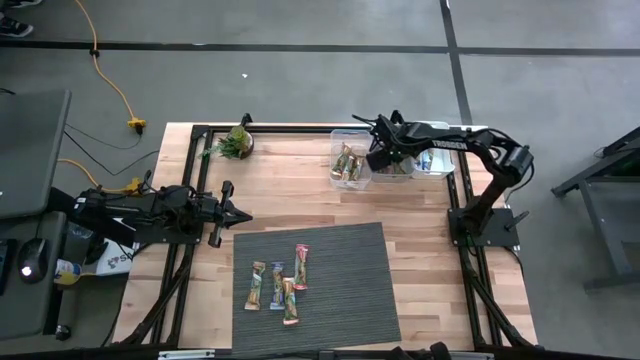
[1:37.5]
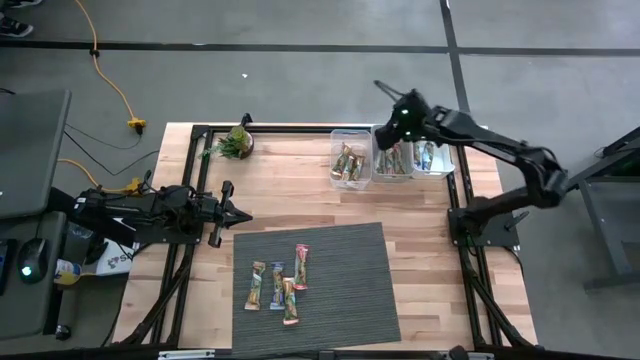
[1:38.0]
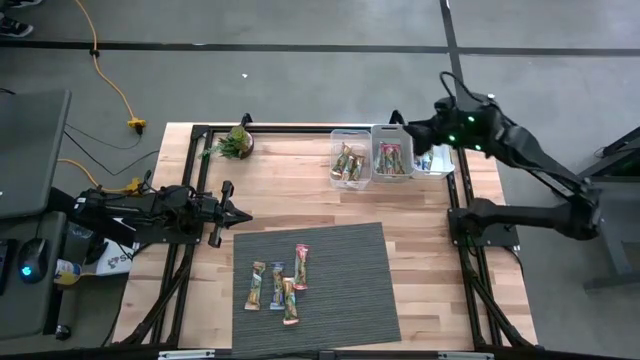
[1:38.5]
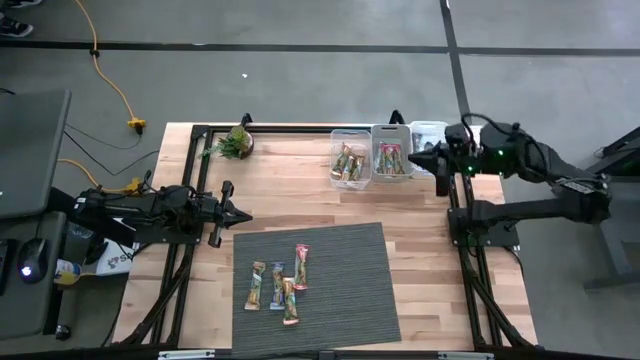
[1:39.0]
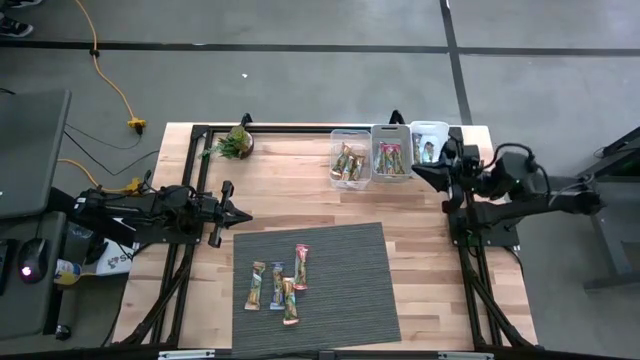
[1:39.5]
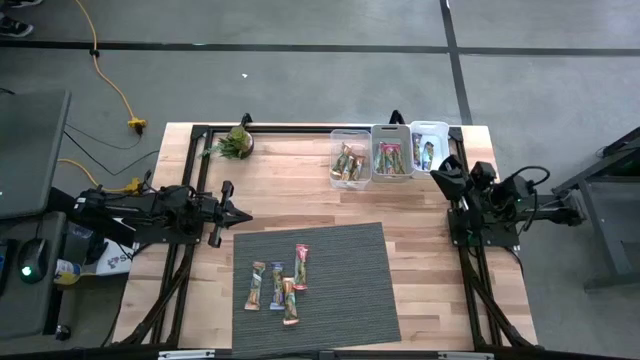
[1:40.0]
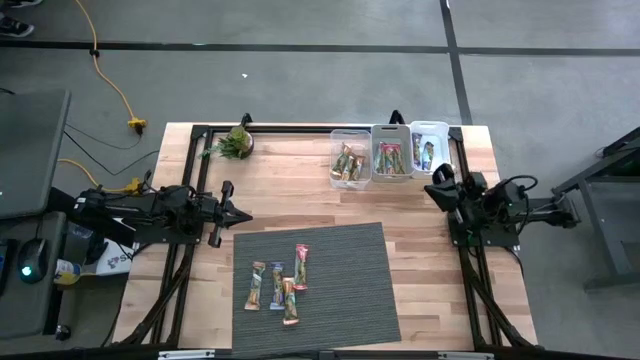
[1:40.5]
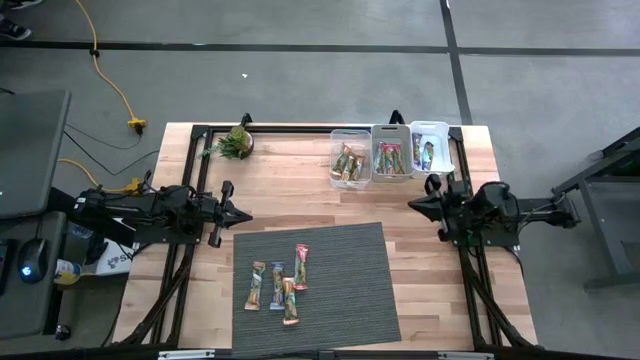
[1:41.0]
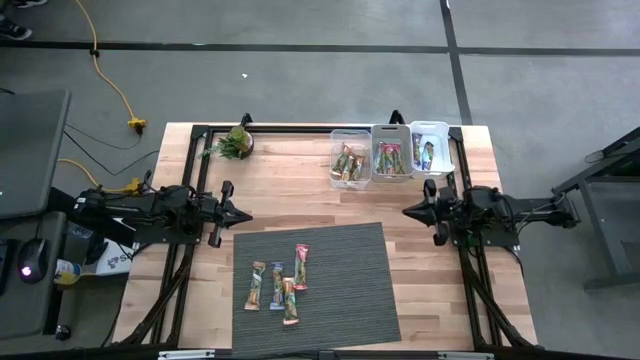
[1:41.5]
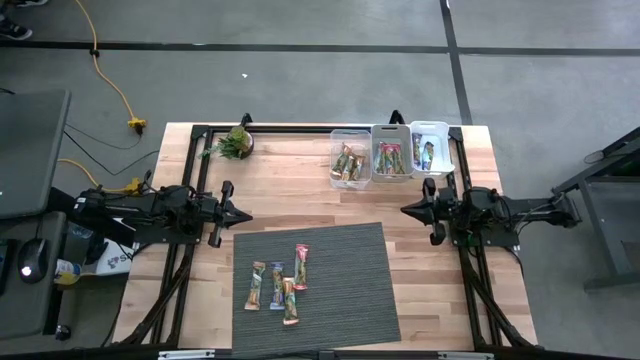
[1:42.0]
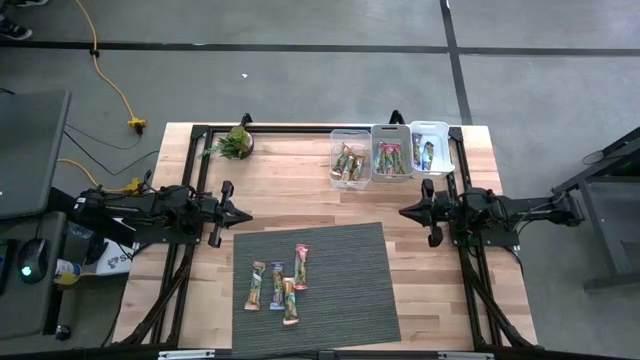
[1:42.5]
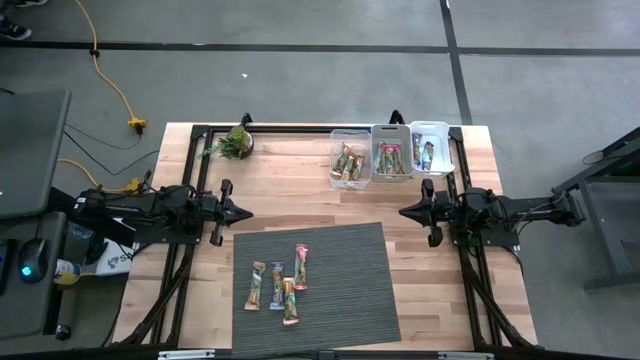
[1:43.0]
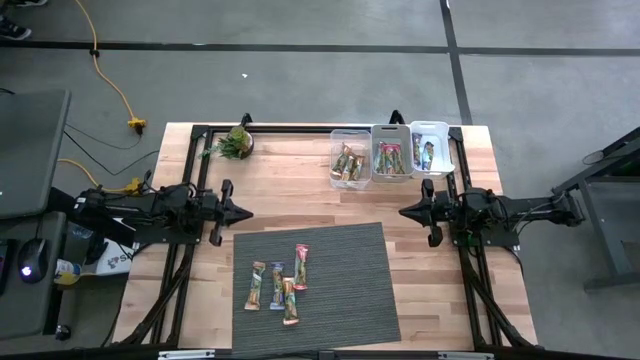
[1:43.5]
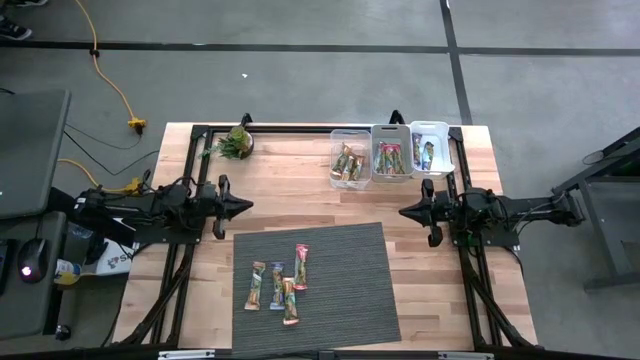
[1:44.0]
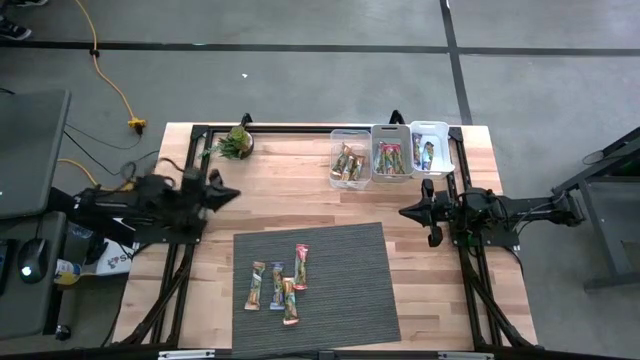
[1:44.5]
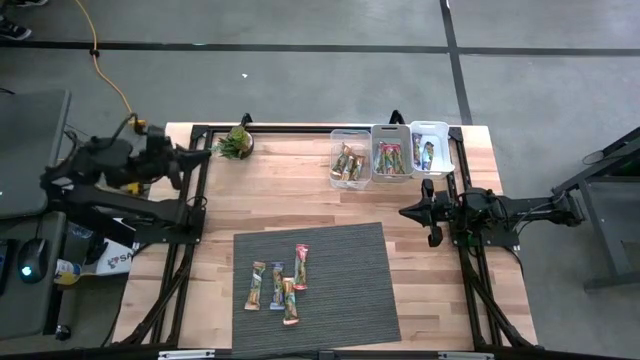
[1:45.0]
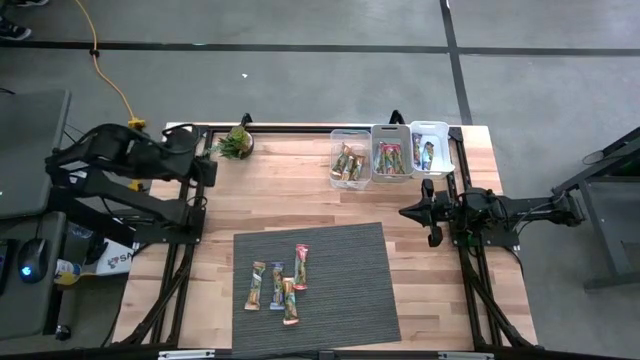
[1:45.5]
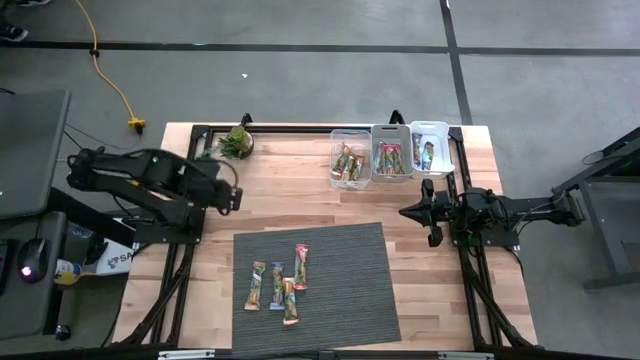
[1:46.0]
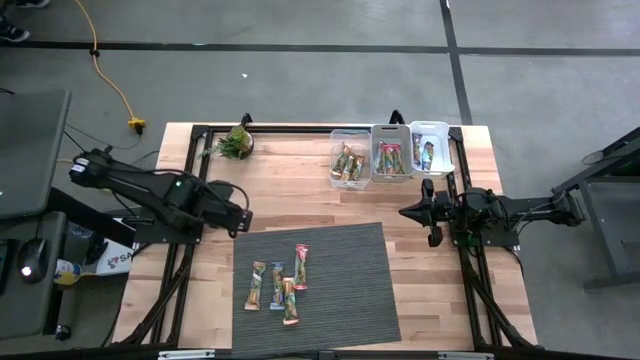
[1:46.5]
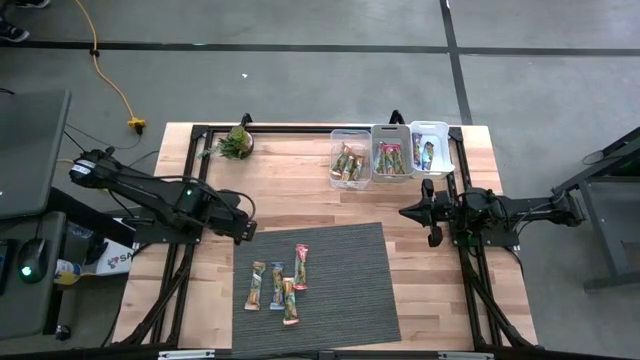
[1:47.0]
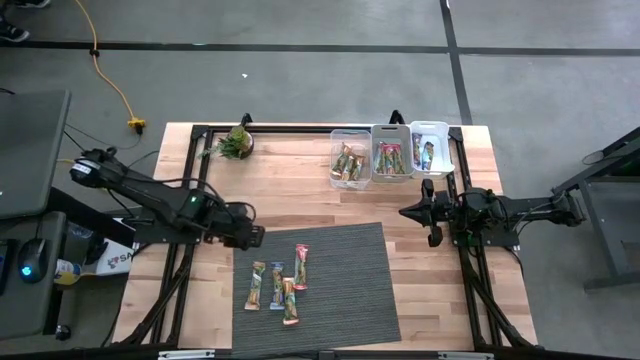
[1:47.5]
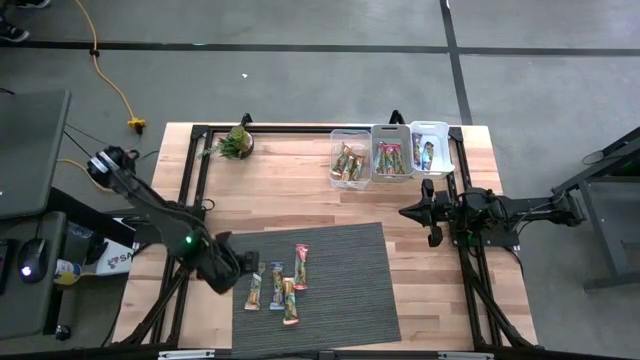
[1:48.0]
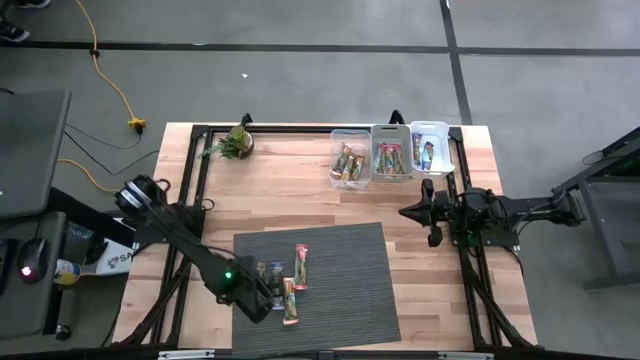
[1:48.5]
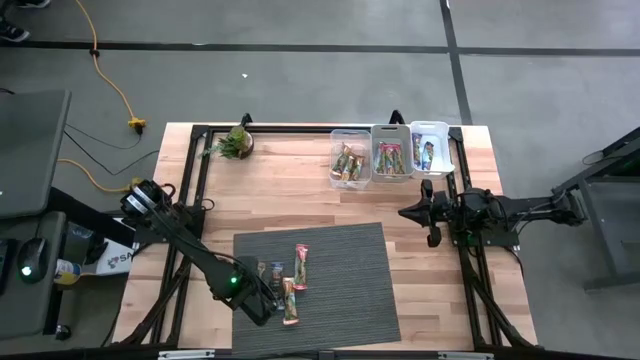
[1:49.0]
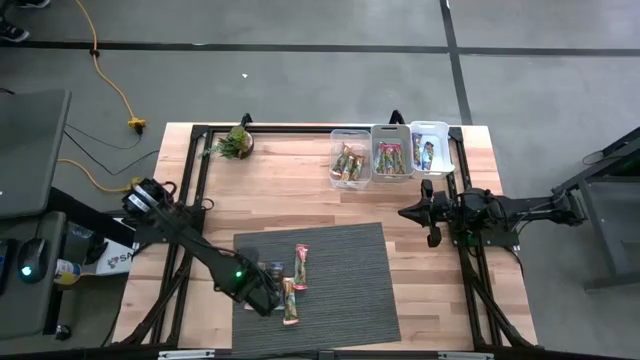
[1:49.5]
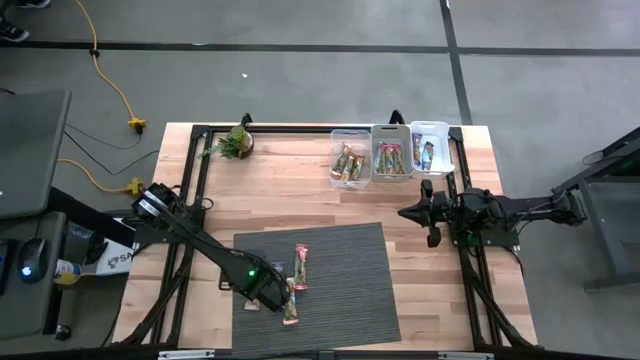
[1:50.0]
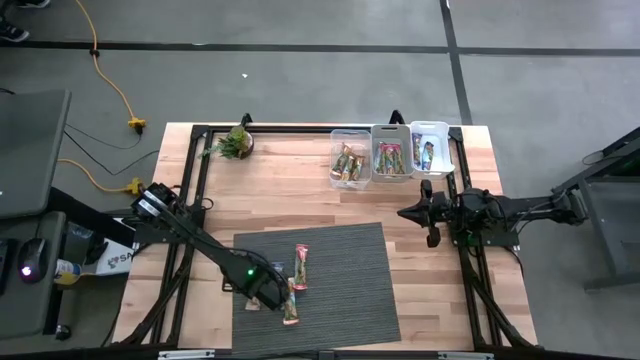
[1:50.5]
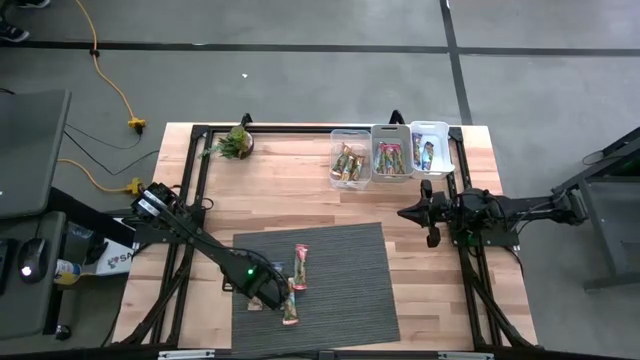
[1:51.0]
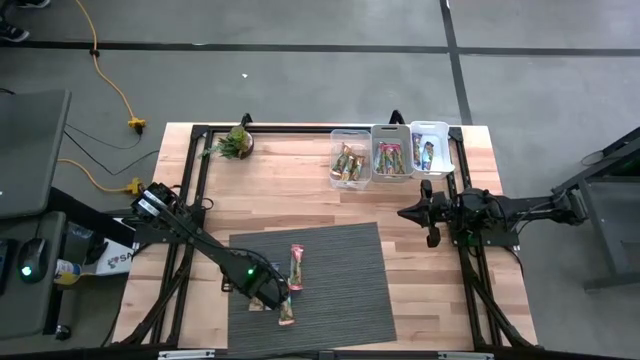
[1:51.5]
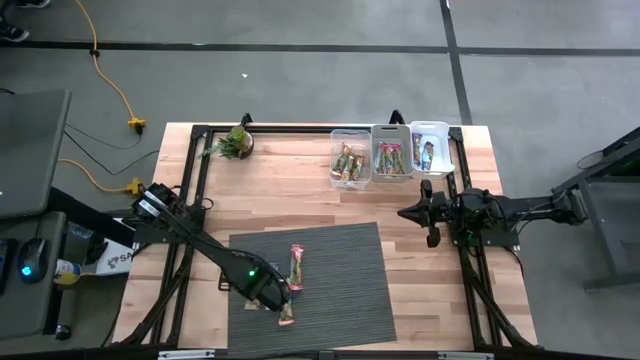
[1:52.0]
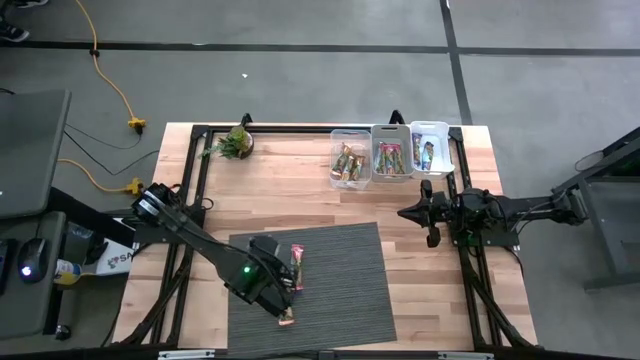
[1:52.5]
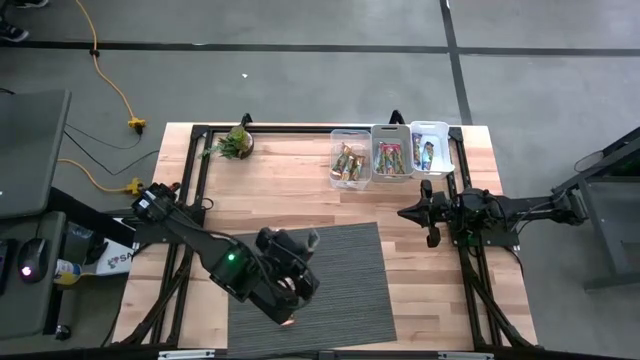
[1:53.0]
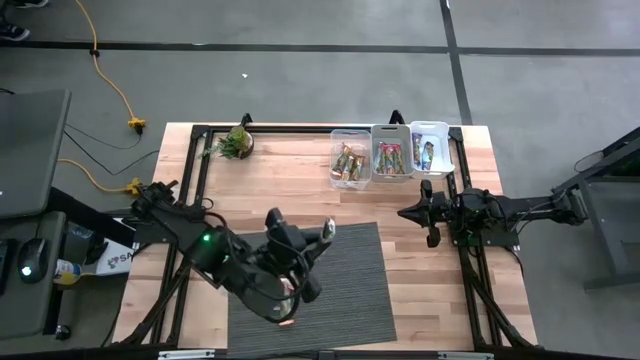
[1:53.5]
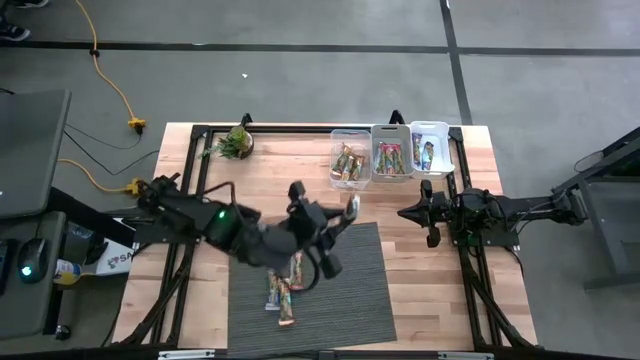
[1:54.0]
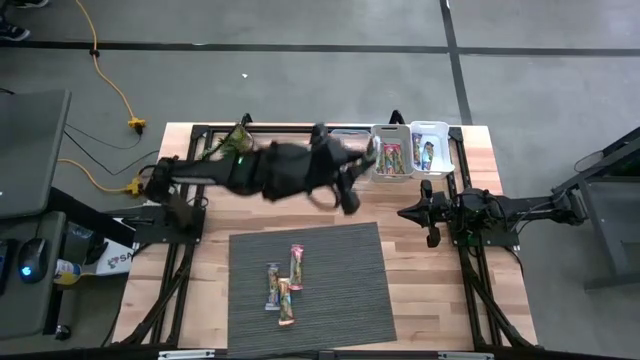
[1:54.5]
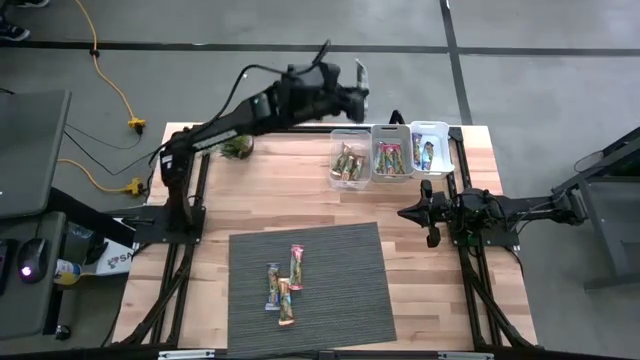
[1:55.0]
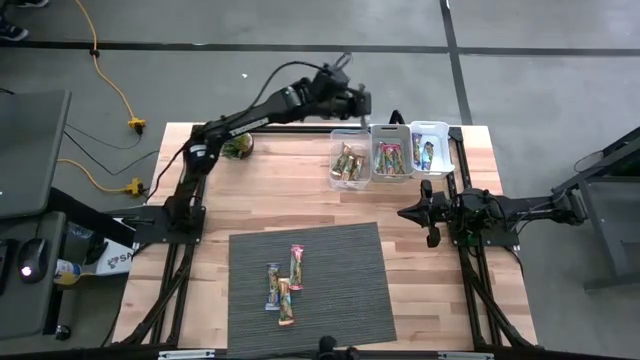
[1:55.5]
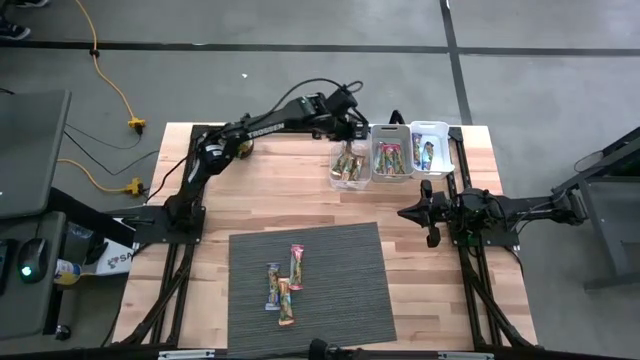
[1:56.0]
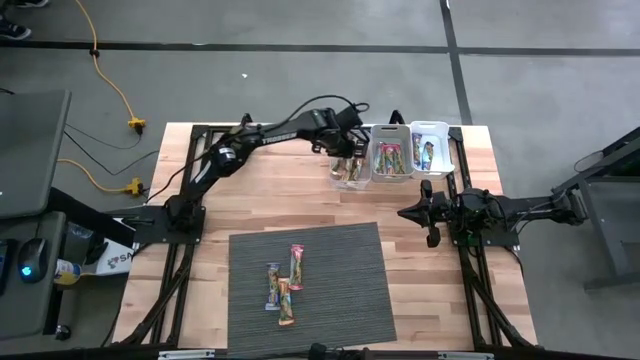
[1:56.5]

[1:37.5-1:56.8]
Task: Pick and place Granola Bars by type
Put the yellow granola bar into the transparent bin
